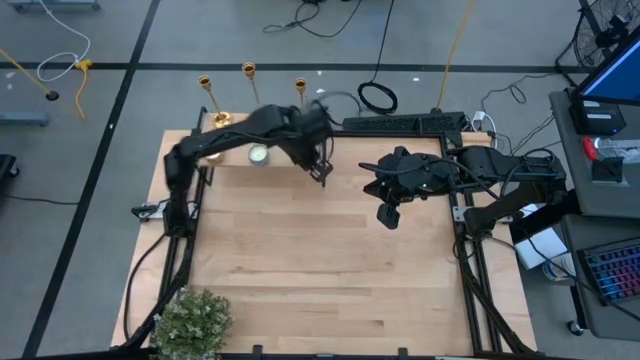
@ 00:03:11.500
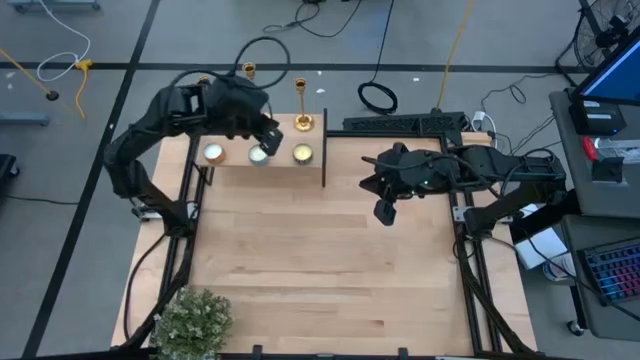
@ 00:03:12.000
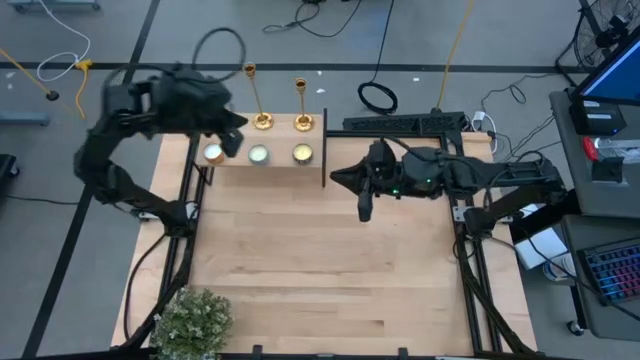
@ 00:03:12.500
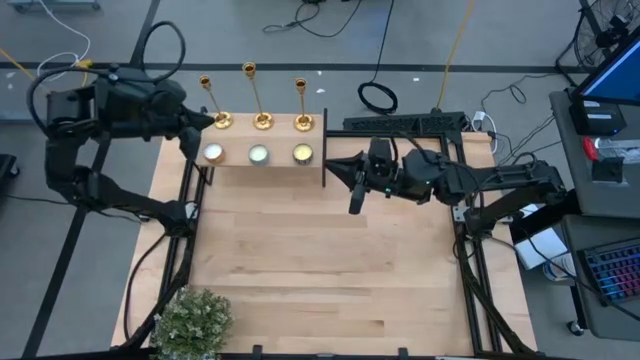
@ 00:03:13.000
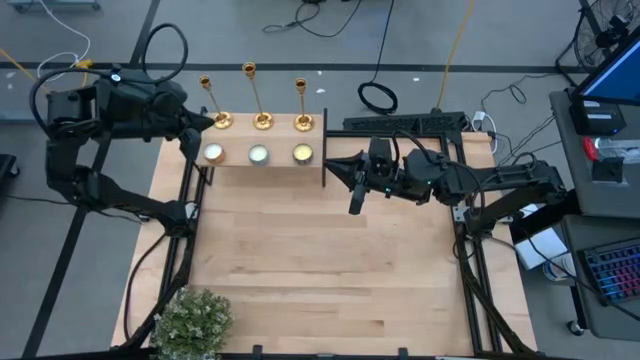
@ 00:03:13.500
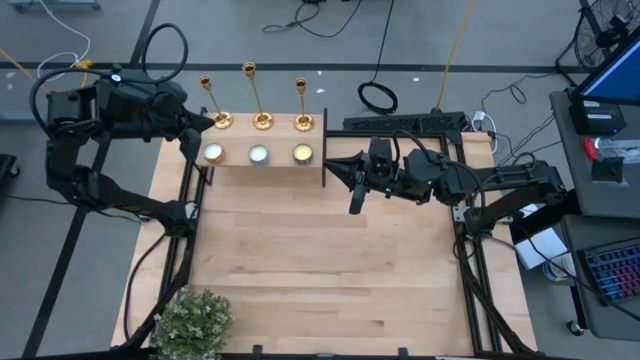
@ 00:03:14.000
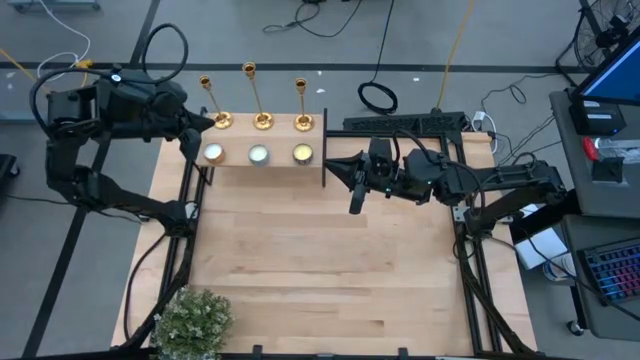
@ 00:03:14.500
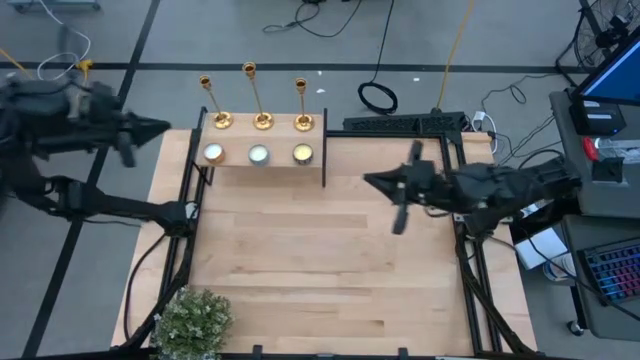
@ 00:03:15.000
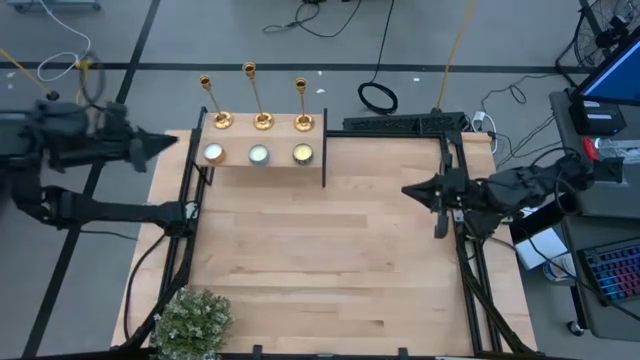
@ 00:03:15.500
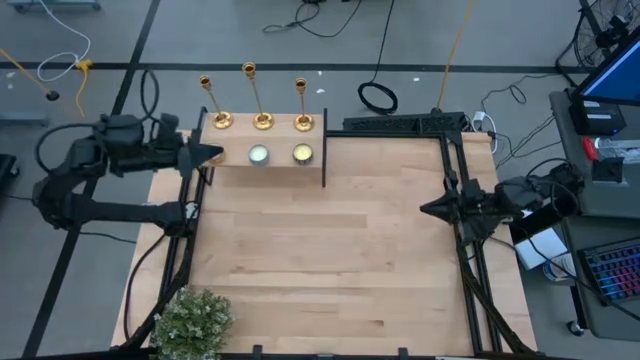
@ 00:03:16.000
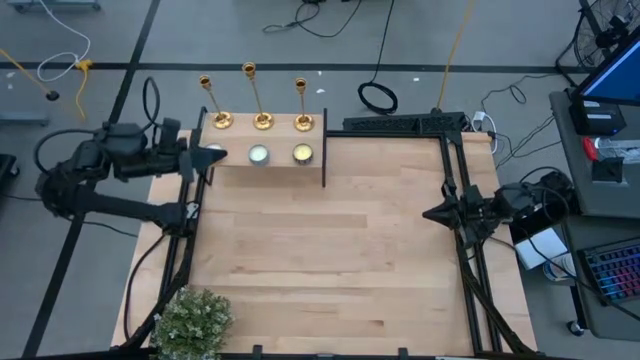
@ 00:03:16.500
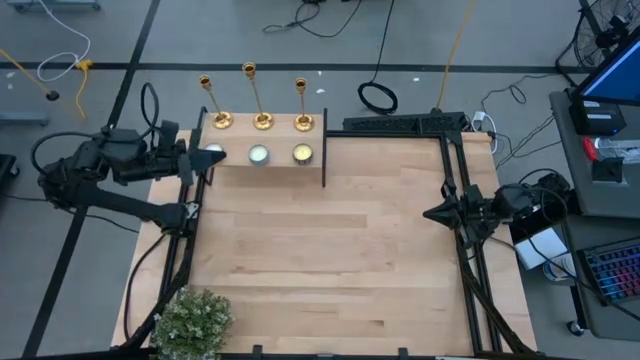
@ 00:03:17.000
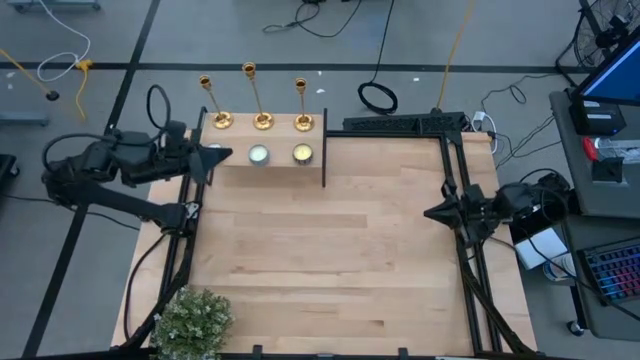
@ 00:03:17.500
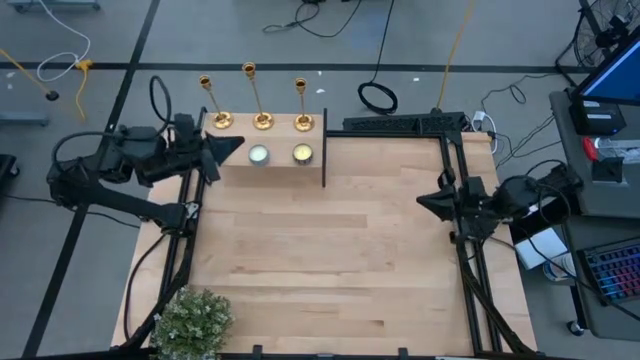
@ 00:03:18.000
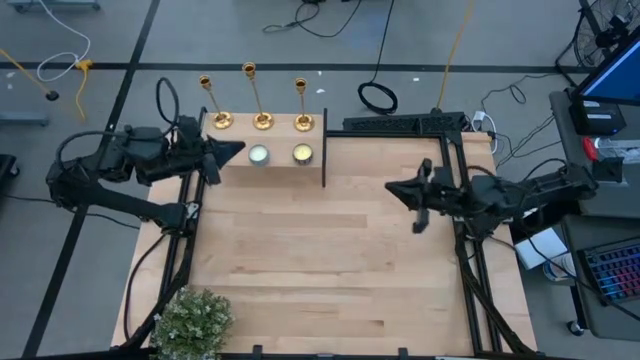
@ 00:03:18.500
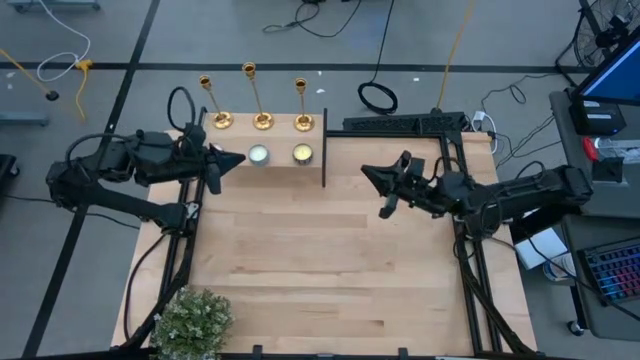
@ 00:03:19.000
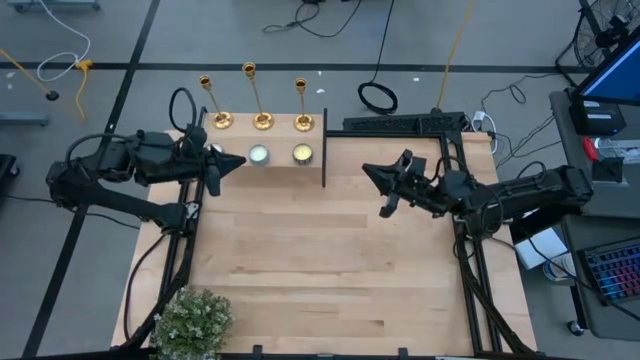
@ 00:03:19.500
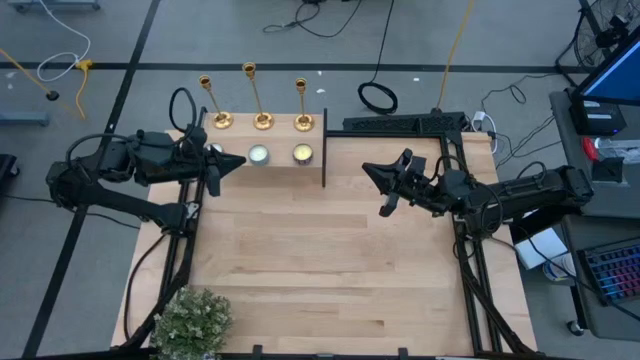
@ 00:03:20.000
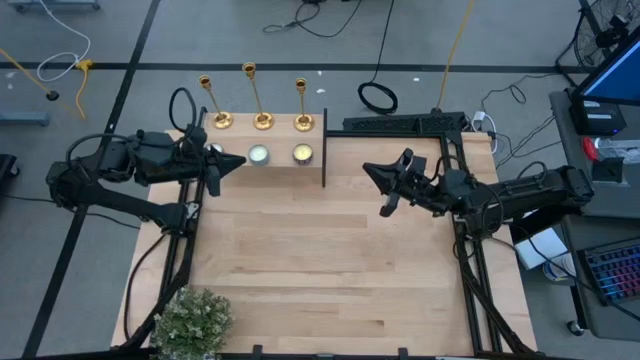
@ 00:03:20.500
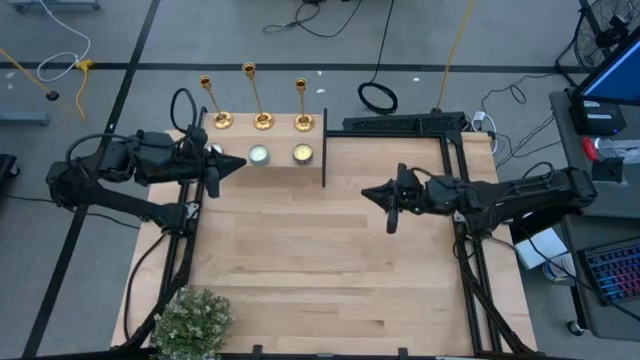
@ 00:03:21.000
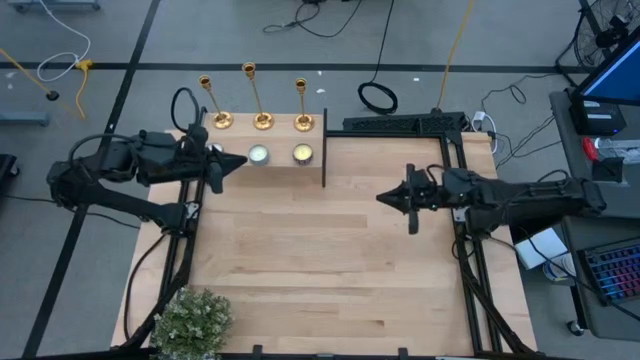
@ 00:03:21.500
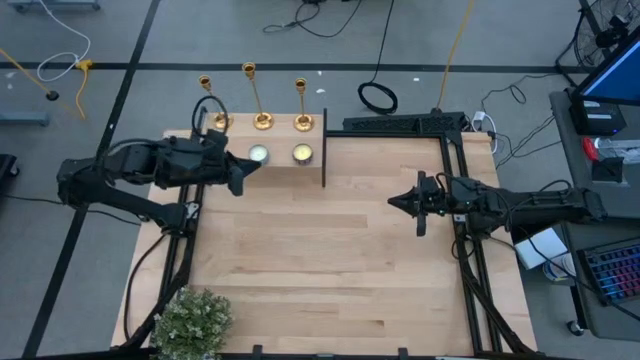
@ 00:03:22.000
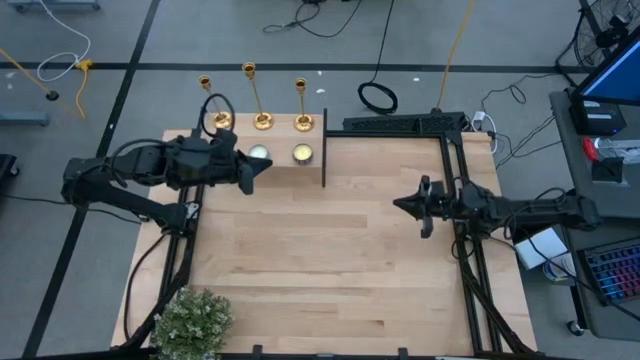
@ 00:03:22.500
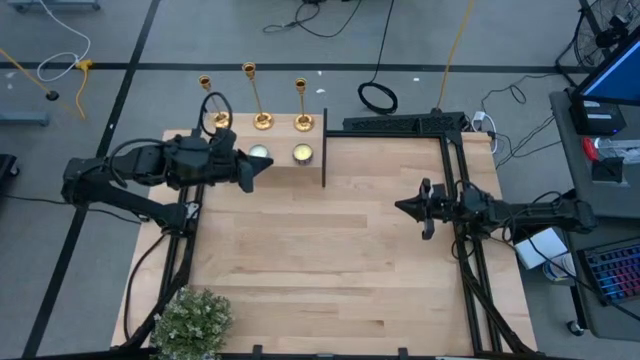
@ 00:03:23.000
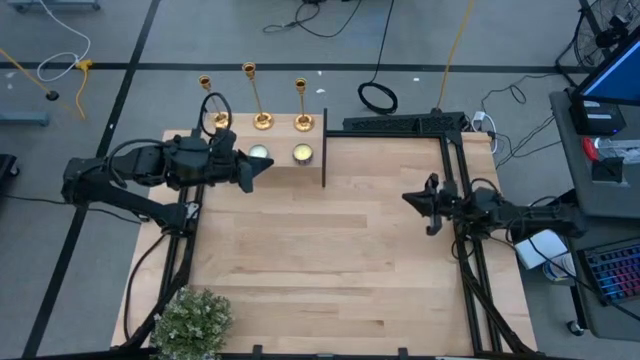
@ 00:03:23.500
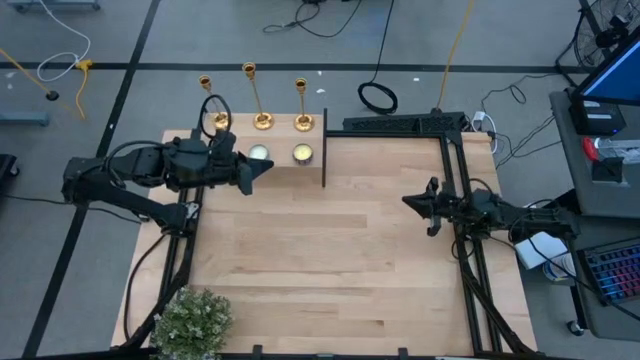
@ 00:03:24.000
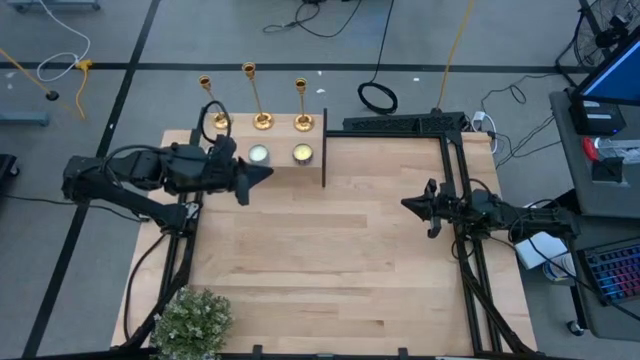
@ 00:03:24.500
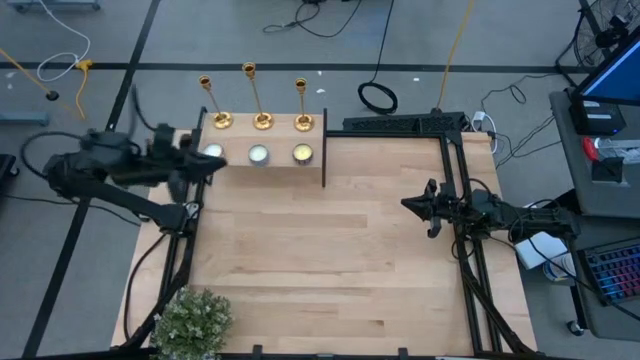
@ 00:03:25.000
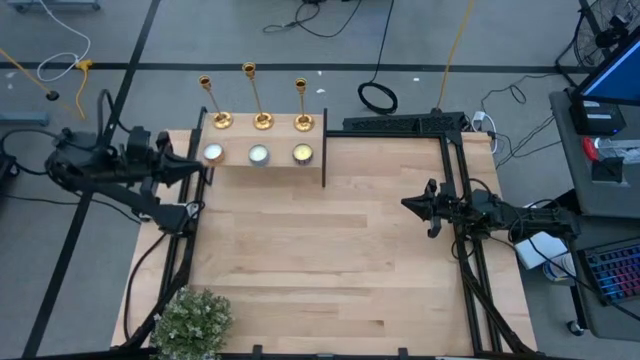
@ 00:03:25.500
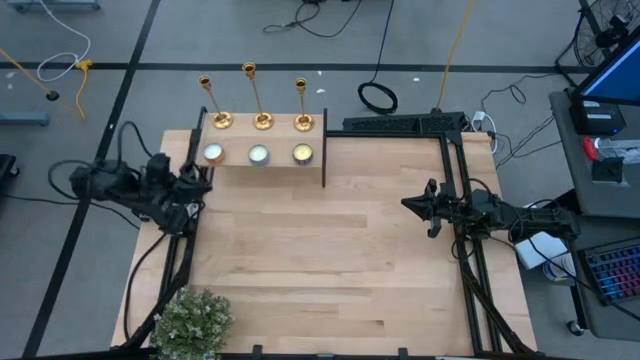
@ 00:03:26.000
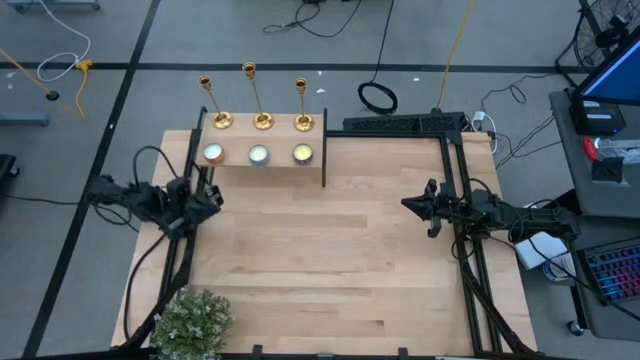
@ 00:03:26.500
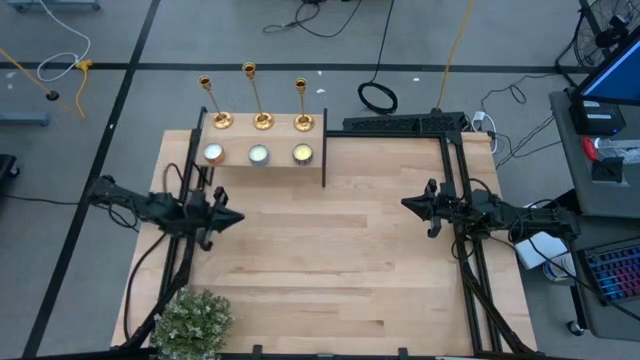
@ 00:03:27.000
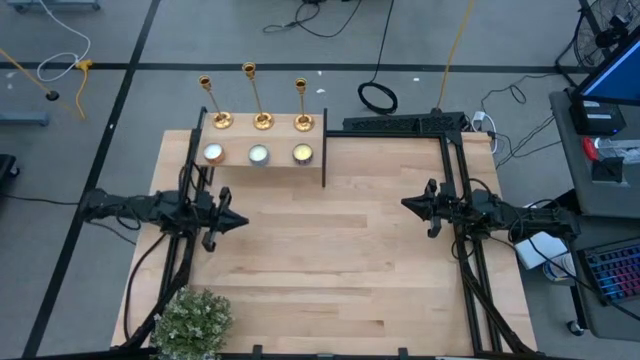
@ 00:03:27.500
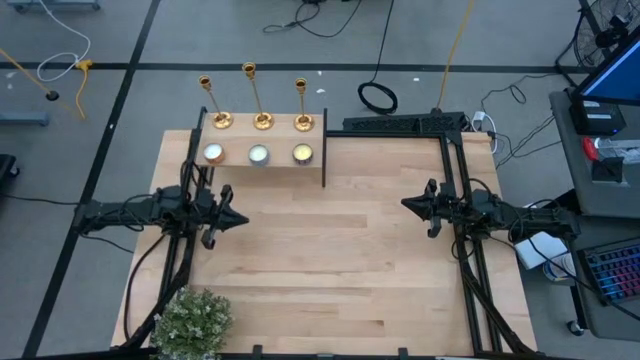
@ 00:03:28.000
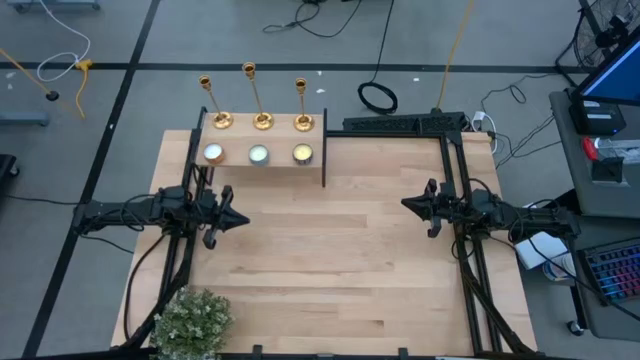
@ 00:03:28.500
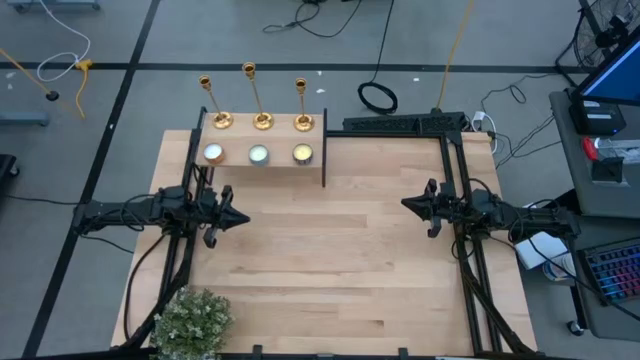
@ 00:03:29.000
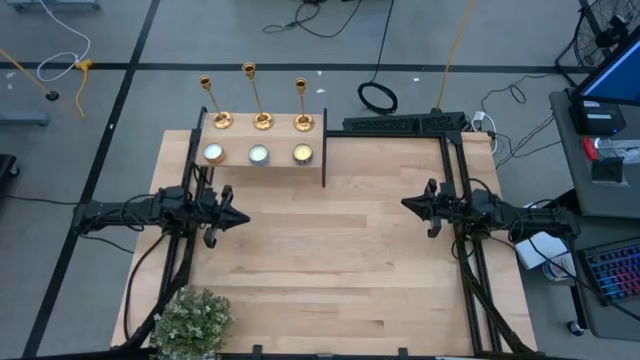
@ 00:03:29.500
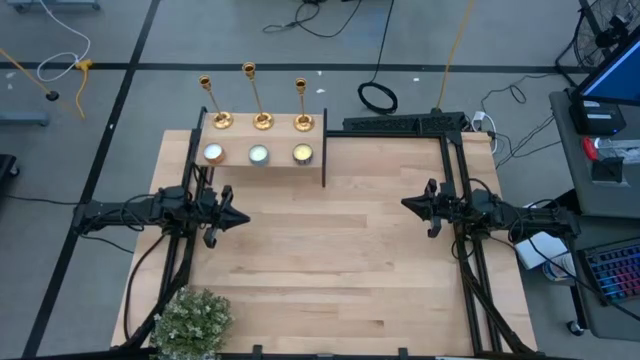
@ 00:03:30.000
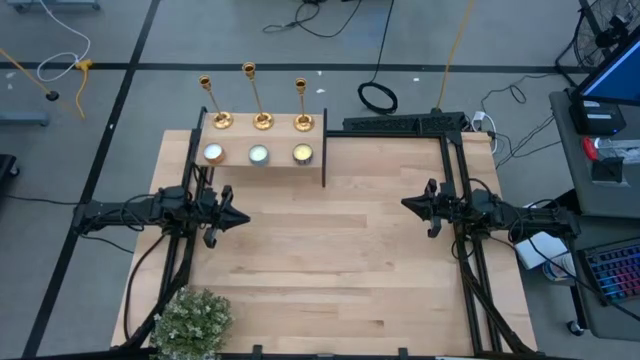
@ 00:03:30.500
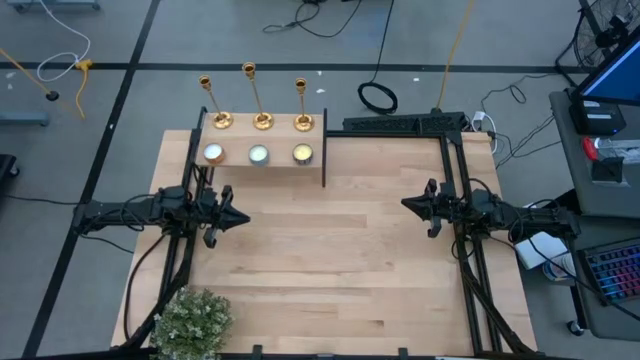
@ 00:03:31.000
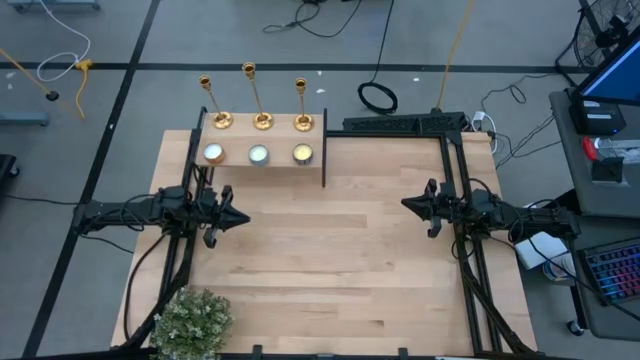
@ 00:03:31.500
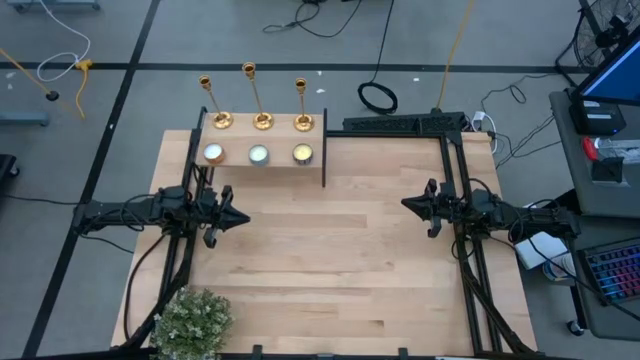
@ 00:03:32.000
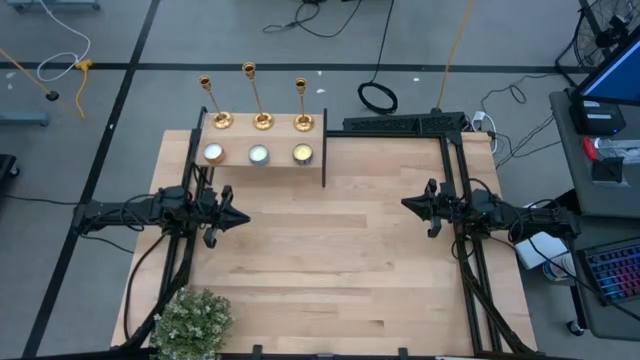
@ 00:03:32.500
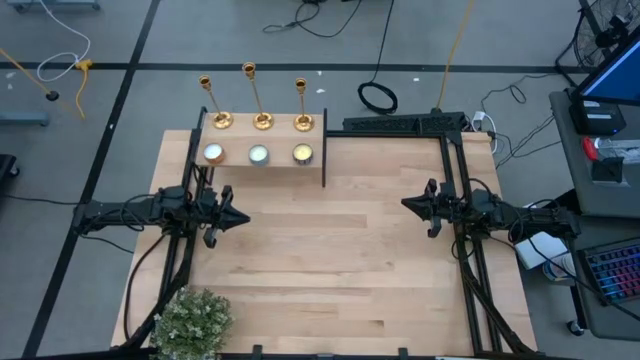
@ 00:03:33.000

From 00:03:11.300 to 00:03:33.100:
Task: Pick & Place candle stick holders
Return to Home Position
